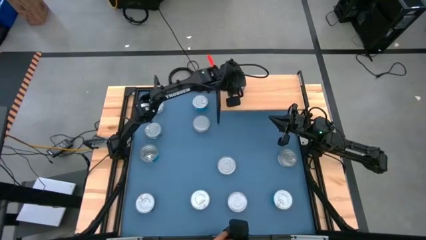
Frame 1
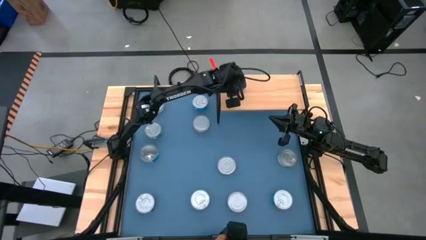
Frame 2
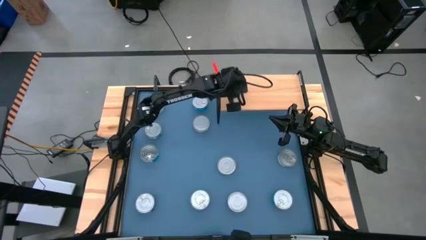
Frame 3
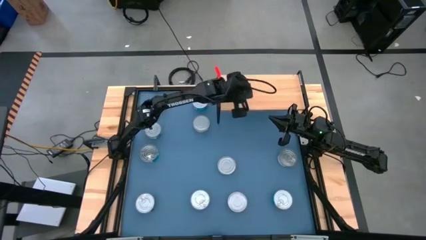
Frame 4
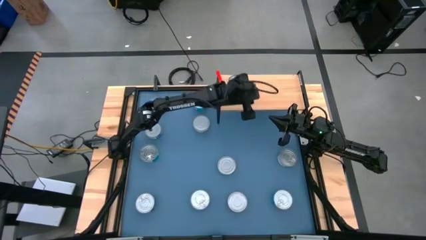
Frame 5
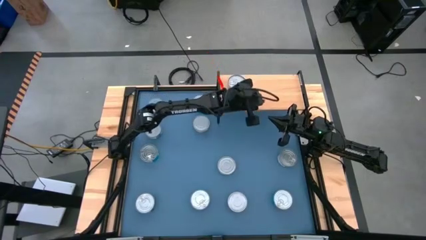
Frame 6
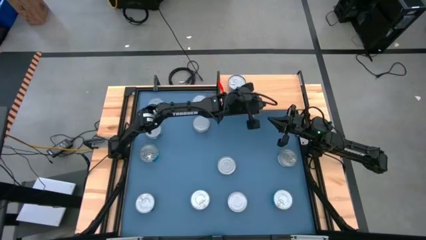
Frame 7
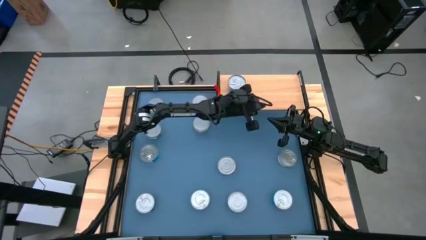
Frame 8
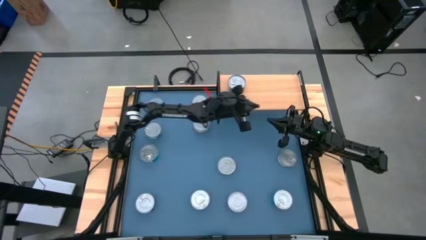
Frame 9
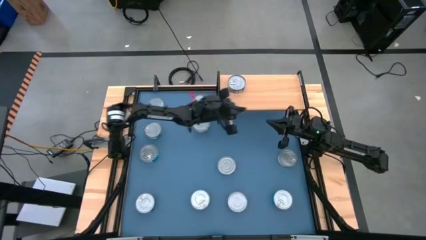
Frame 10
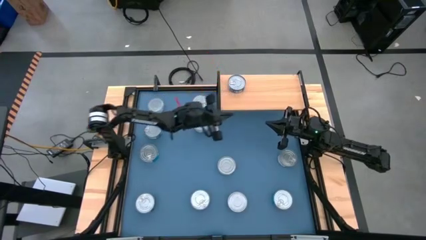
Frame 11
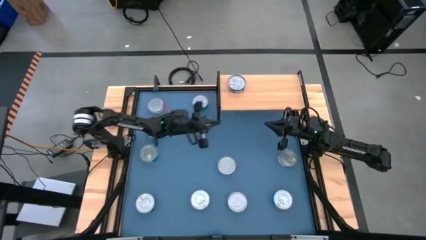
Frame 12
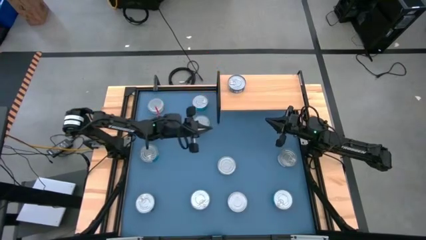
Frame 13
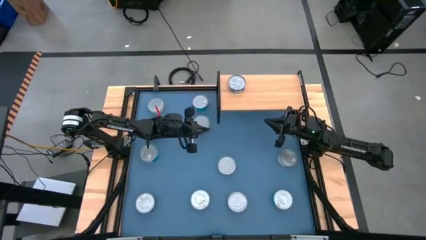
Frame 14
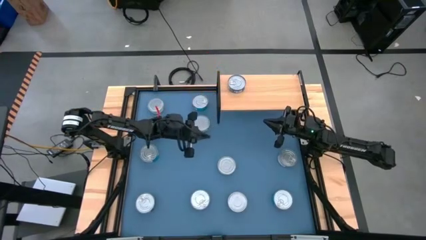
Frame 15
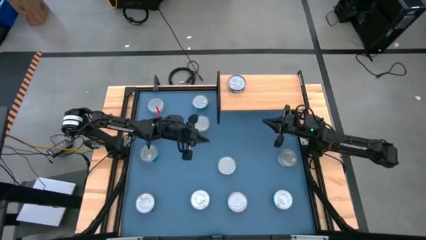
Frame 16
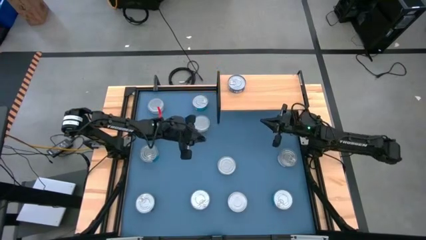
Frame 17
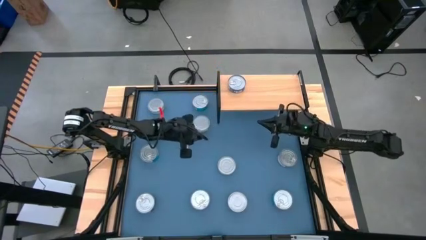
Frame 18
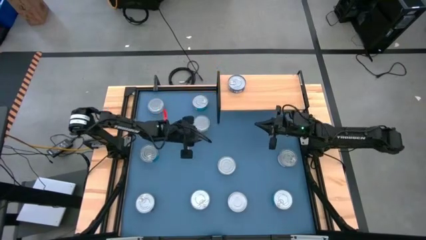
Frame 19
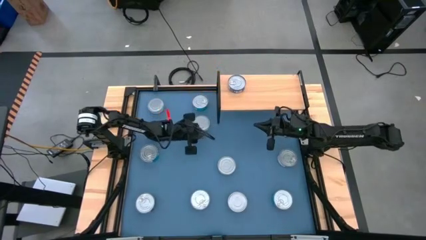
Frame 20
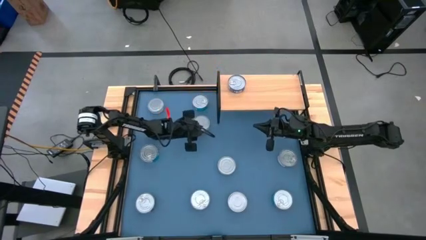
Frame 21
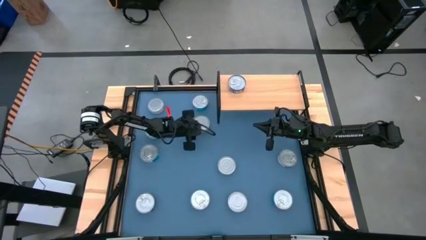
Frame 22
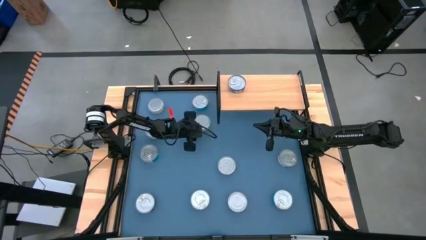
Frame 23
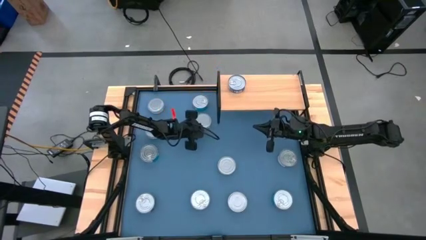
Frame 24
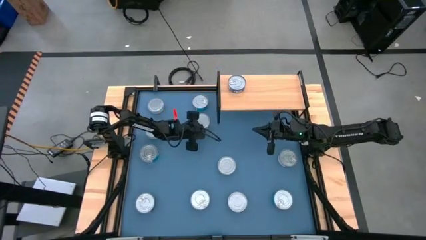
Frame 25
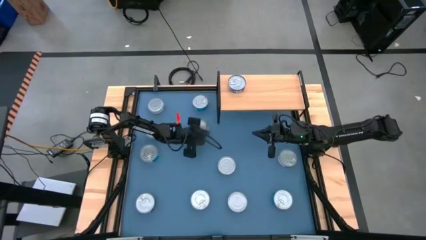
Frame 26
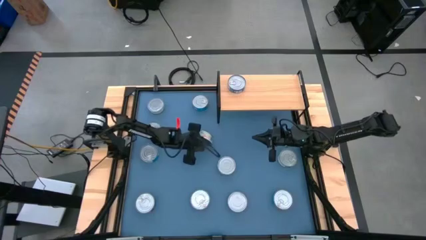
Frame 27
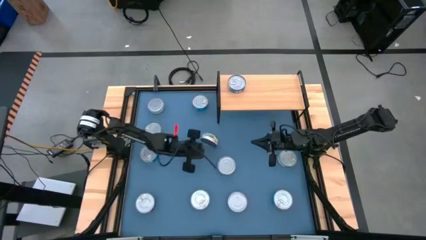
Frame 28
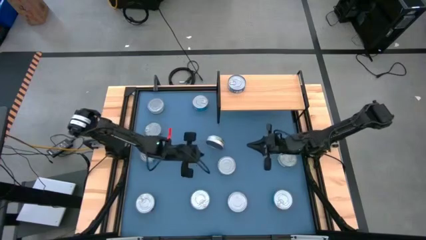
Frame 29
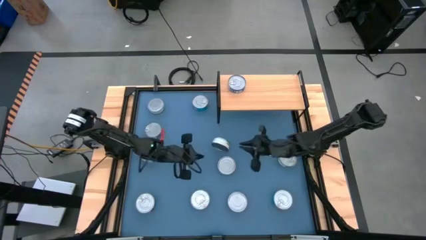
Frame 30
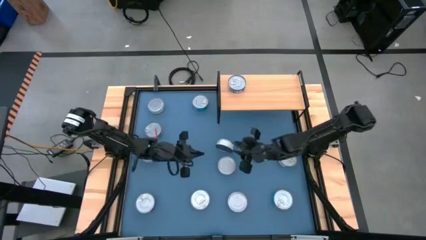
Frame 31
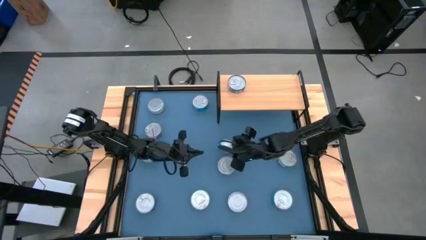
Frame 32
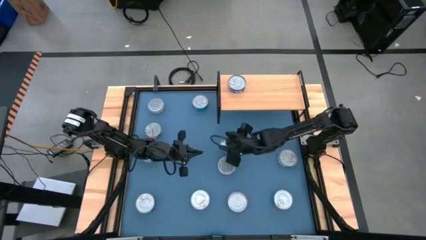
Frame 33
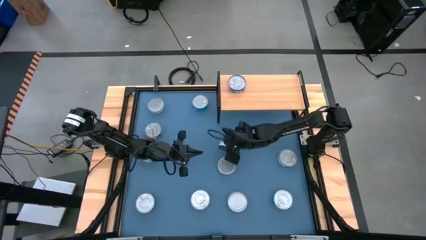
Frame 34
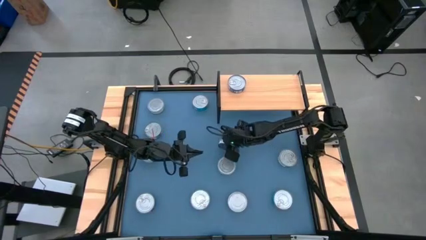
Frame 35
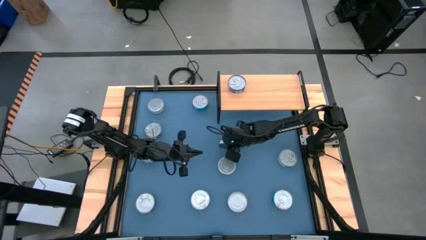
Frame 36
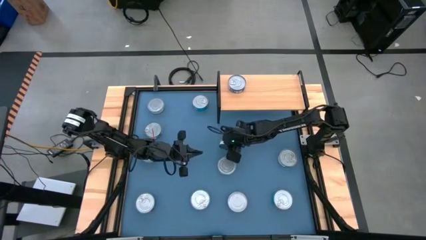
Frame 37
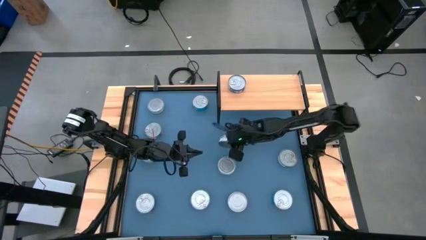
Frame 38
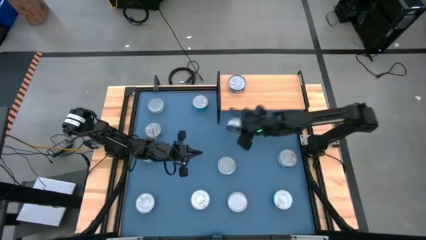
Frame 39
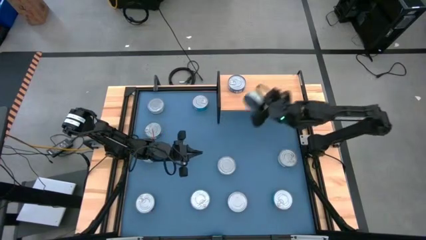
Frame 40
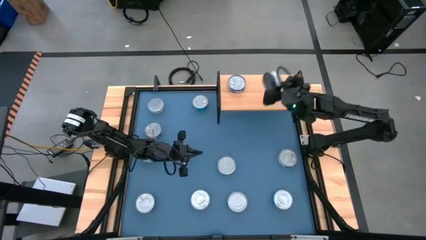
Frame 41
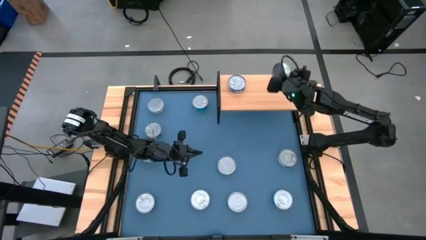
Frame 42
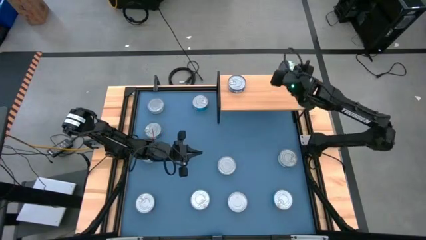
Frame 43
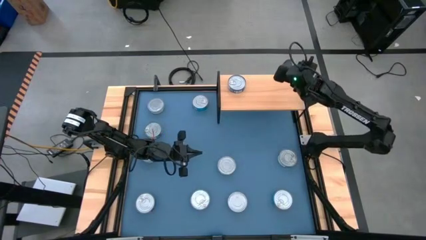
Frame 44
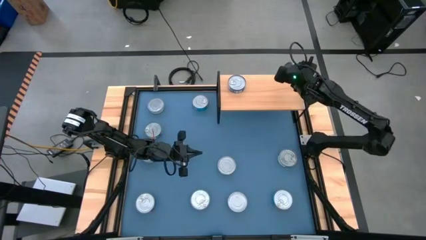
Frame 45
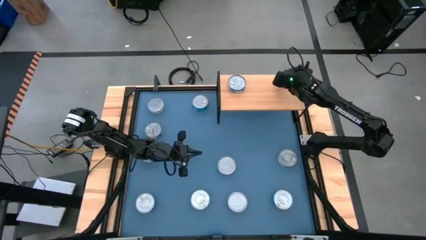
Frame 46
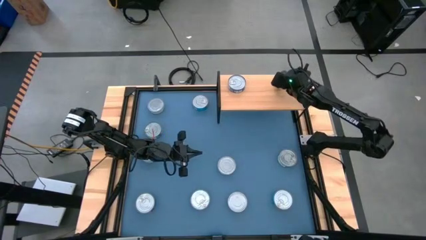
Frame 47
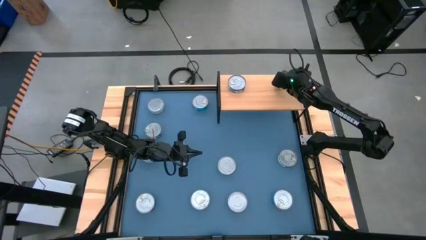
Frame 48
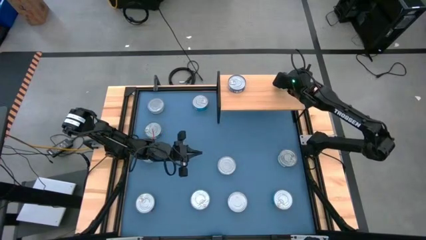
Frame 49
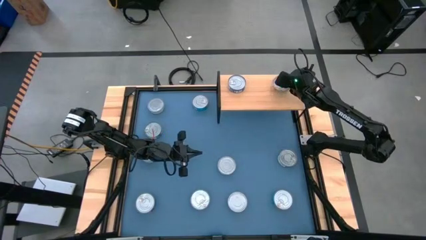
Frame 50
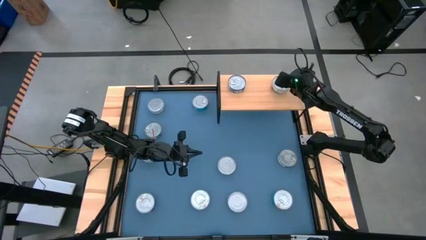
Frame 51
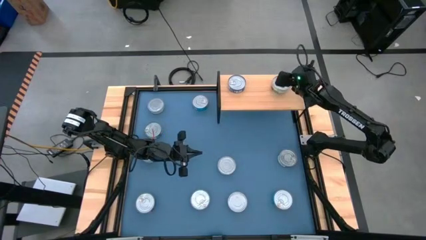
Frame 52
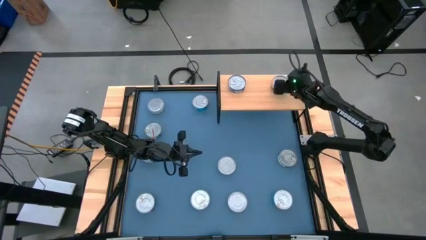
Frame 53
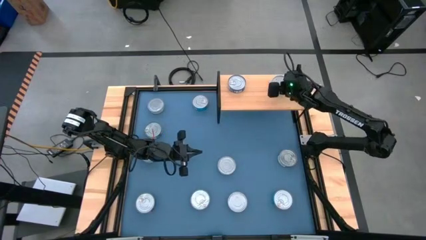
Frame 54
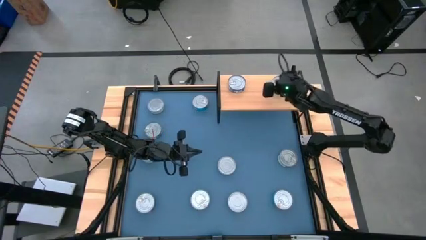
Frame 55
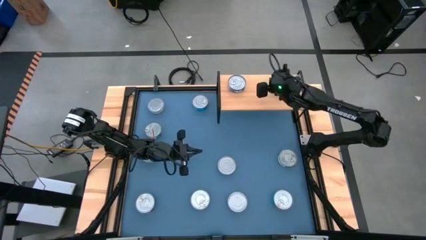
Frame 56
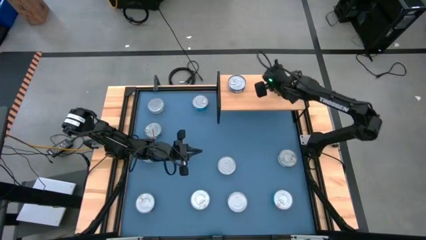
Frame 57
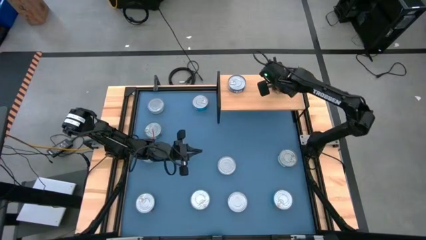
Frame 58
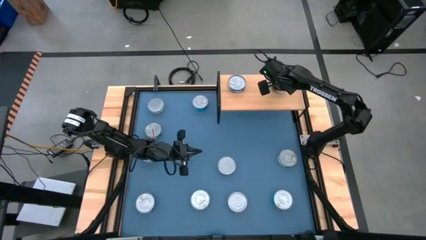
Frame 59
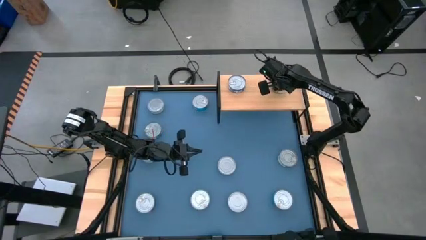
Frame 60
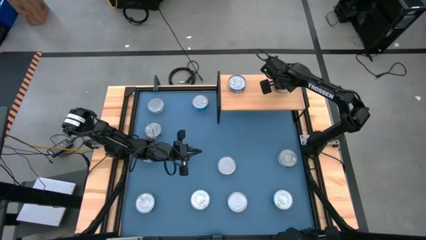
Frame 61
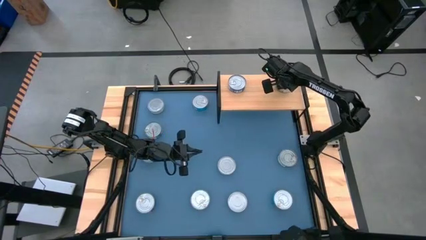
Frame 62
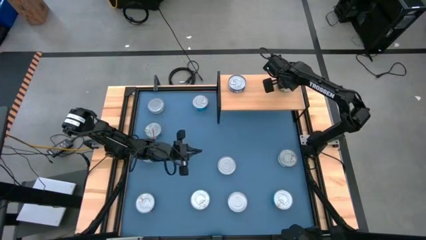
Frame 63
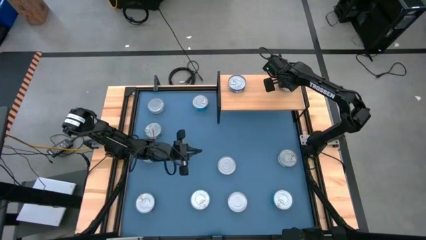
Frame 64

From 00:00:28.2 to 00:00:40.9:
Task: Stack canned seafood by type on shelf
Put the top right green tuna can on the shelf

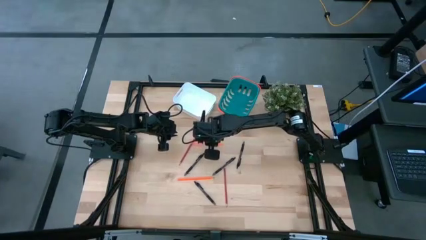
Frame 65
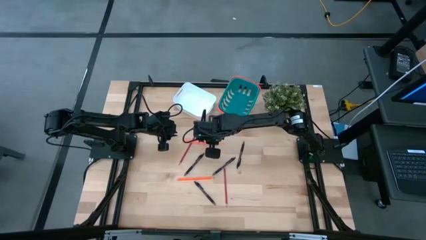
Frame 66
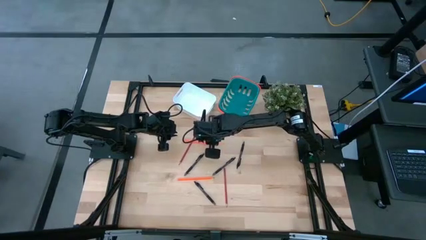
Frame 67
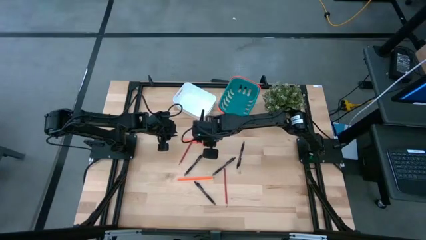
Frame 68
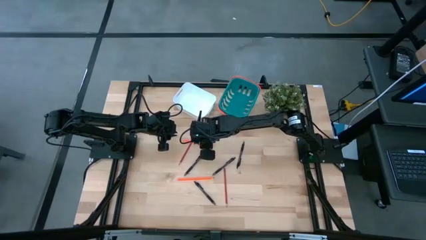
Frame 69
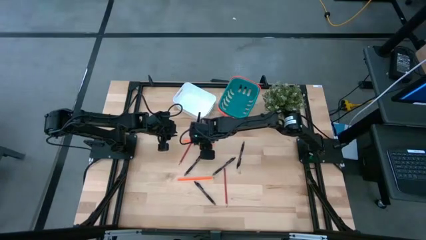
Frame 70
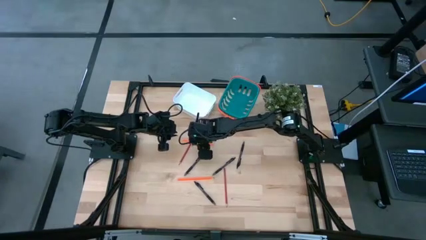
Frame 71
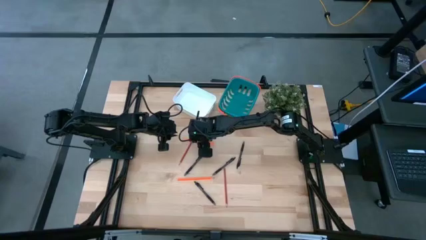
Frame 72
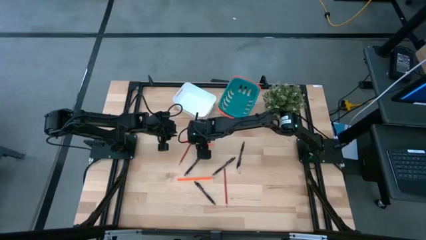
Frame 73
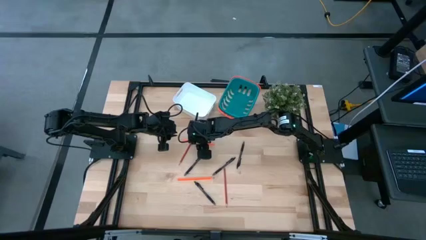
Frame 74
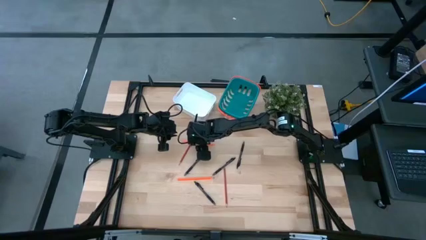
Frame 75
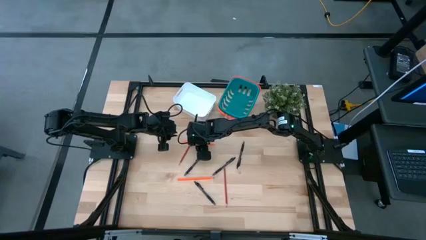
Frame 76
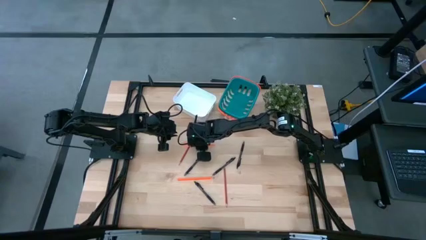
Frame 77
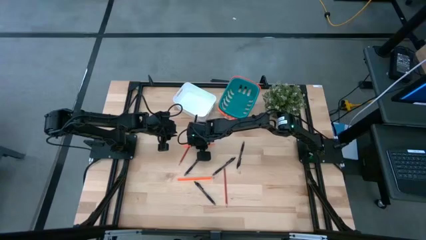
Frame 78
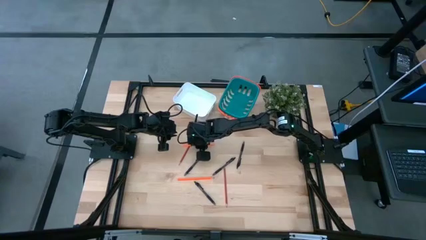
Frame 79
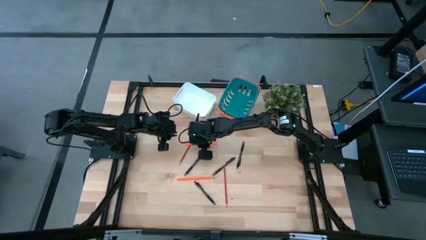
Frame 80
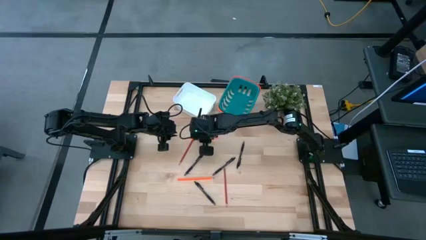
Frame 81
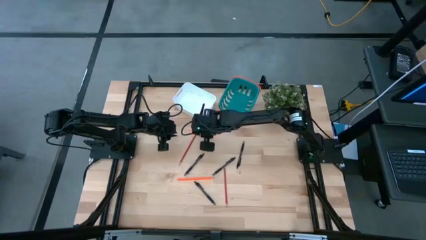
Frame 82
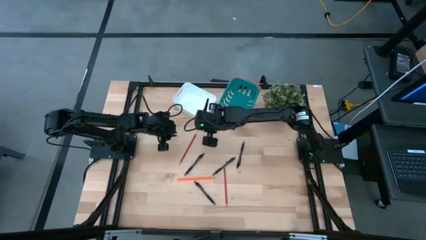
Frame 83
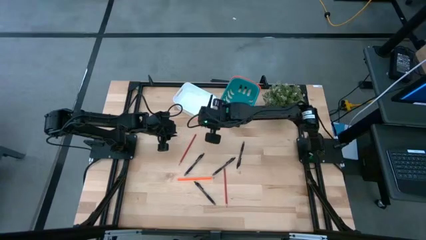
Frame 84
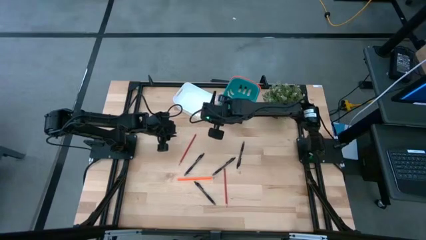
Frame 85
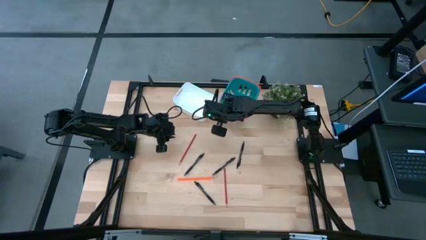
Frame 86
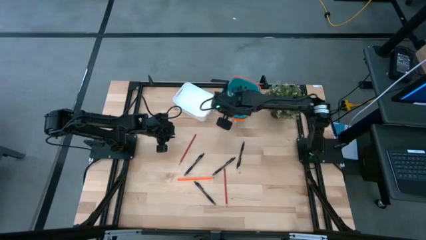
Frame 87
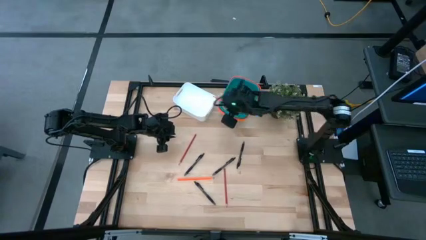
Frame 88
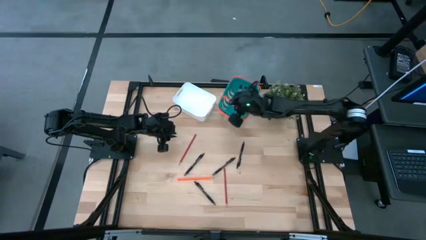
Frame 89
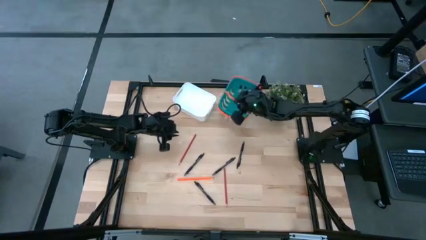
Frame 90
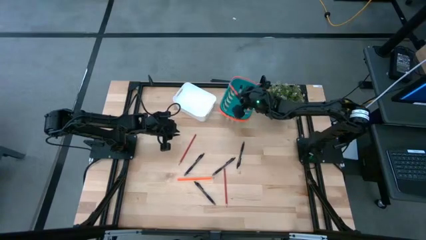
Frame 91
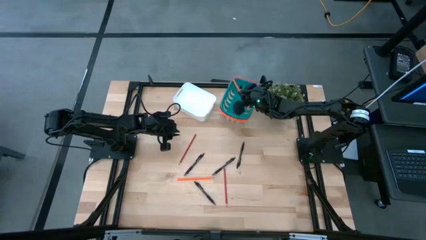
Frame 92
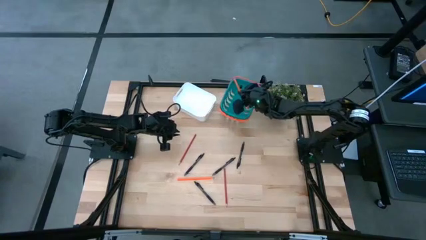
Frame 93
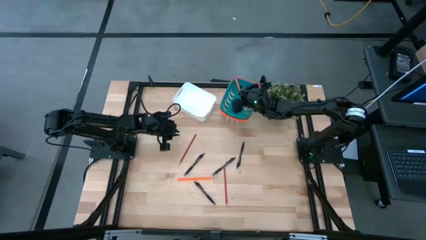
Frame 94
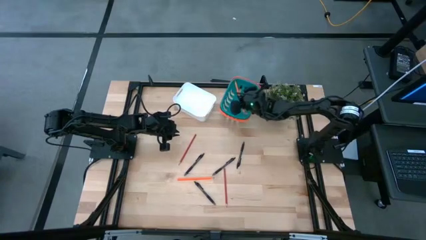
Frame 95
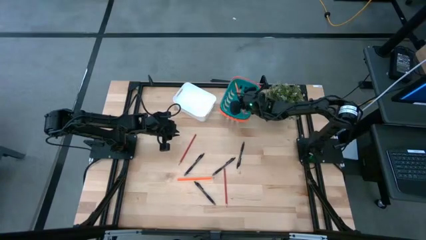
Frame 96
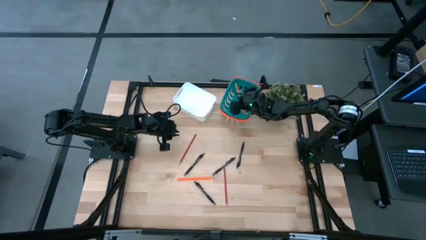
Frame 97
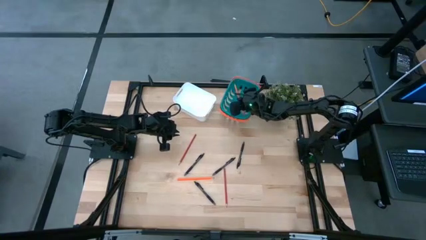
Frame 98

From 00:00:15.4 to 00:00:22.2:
Task: Sort pens & pencils
Put the orange pencil into the green basket
